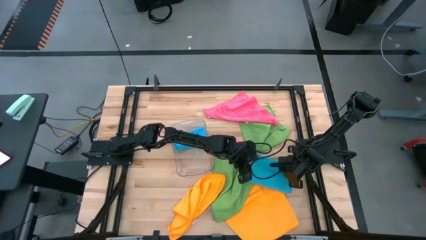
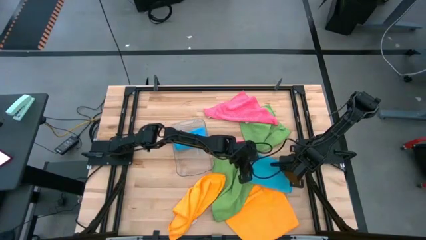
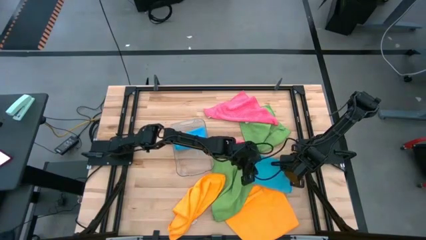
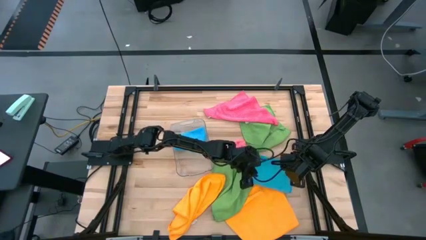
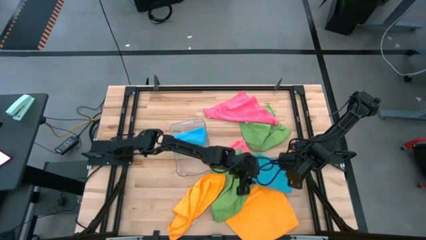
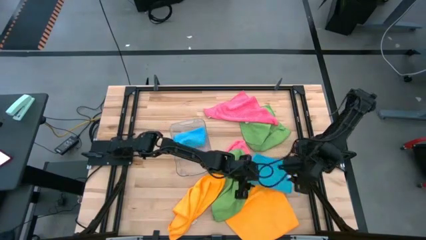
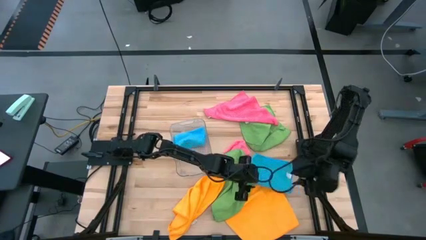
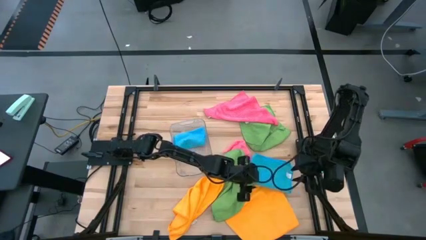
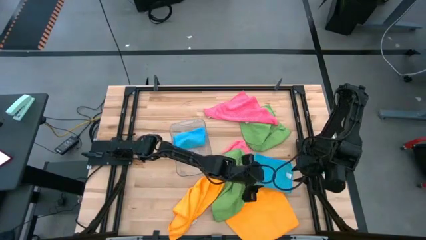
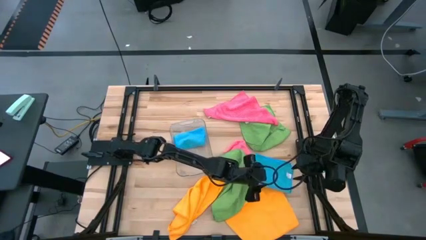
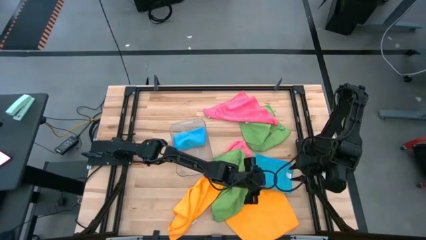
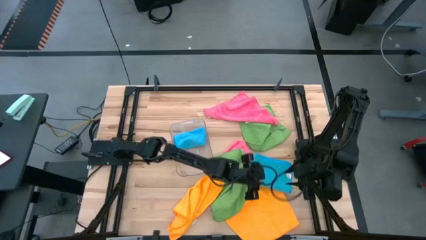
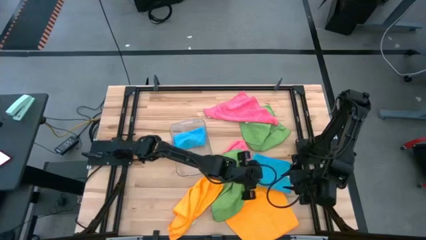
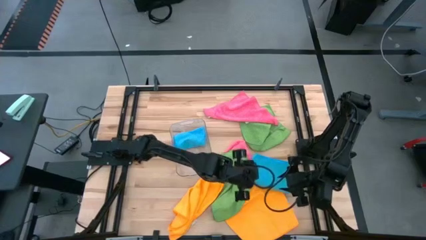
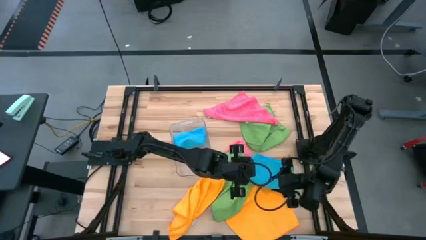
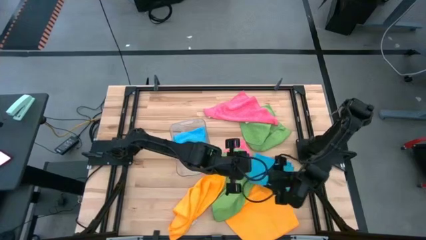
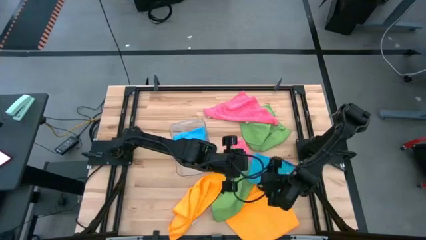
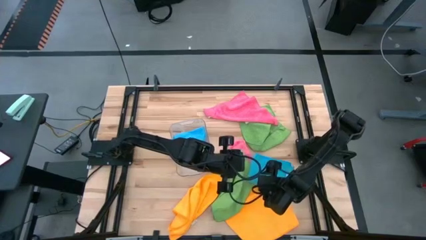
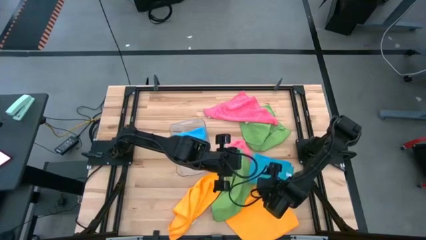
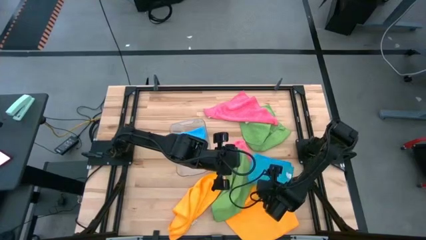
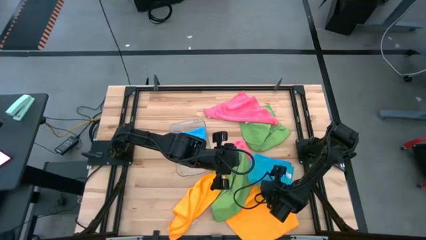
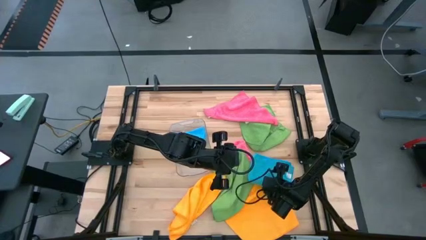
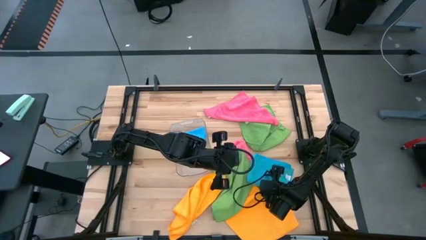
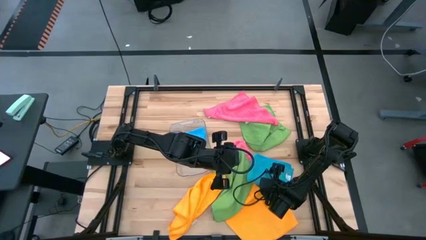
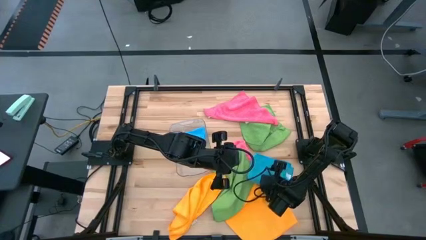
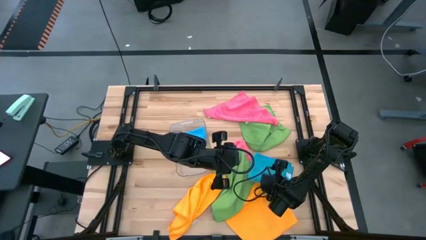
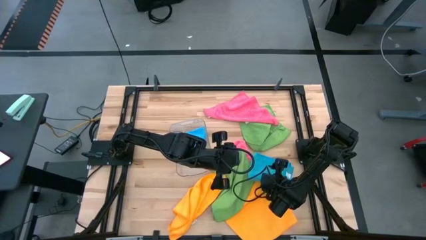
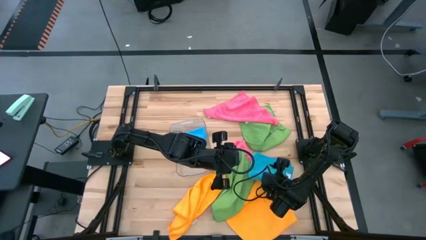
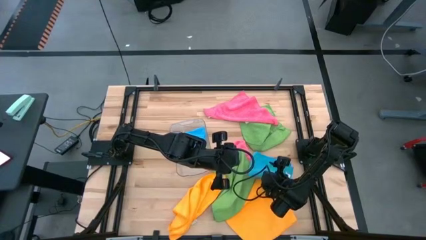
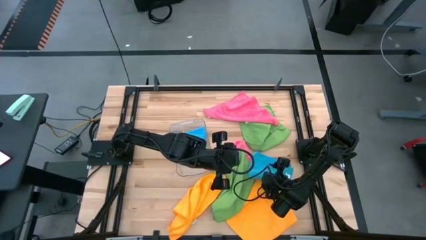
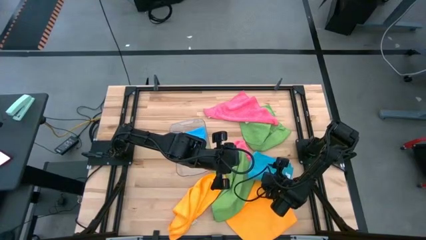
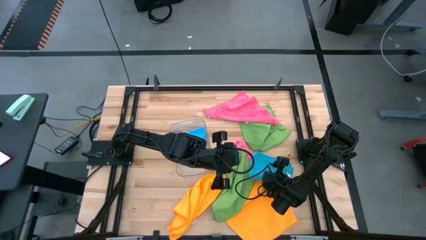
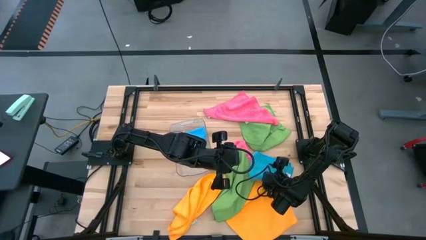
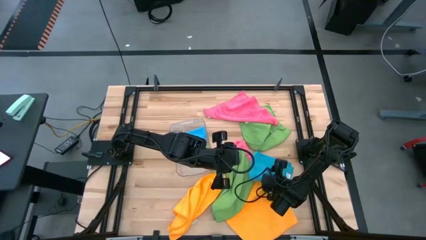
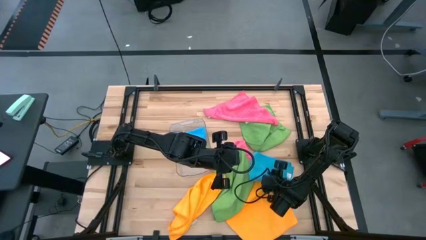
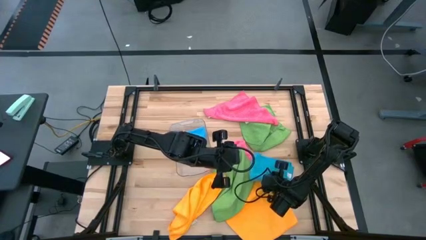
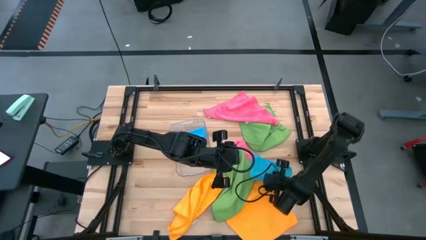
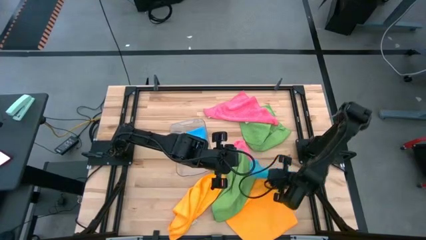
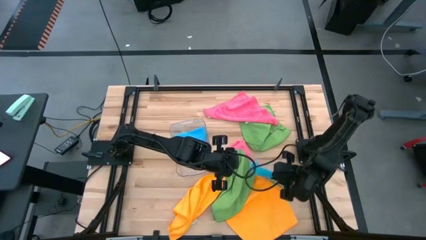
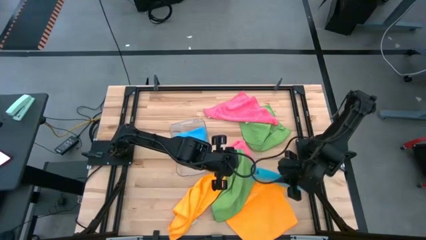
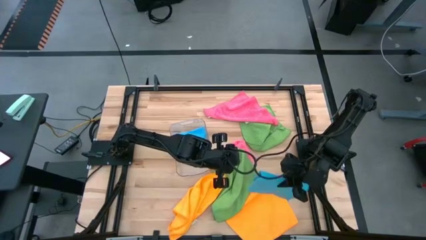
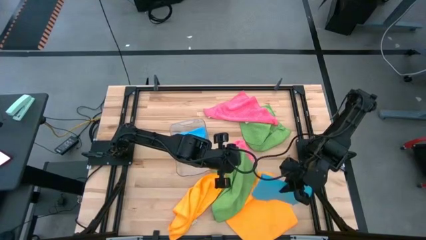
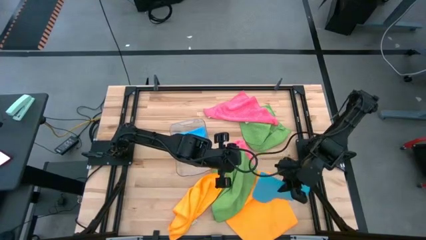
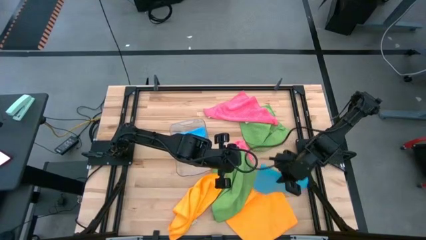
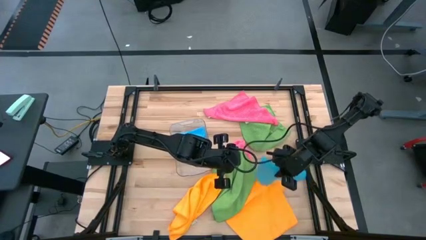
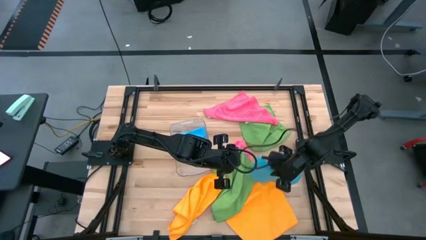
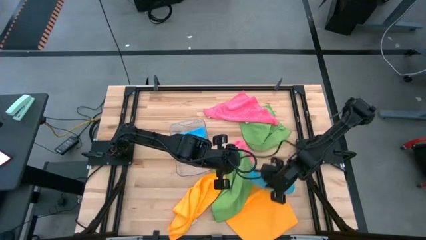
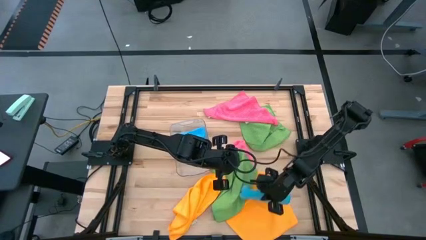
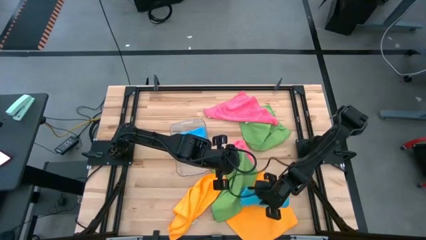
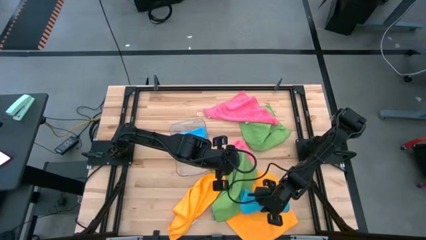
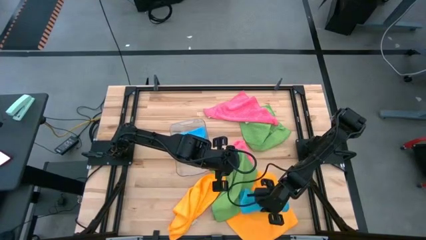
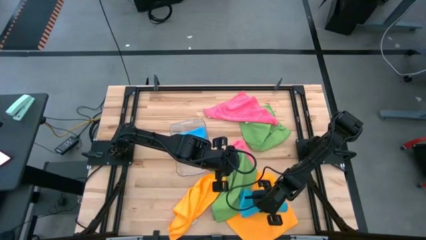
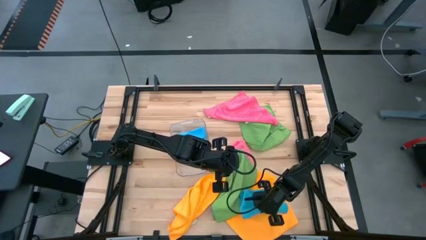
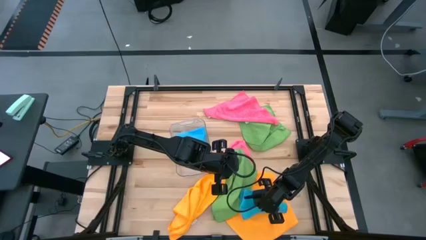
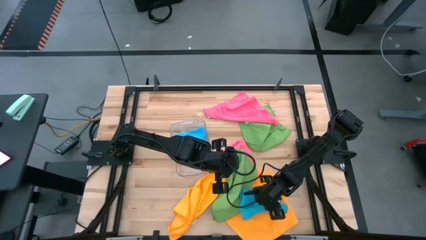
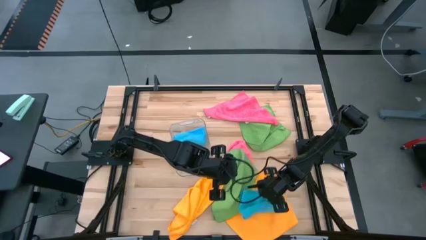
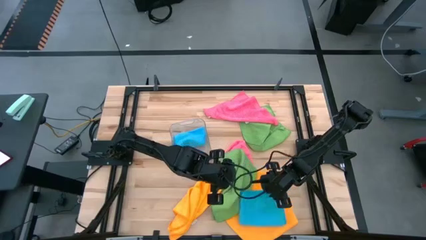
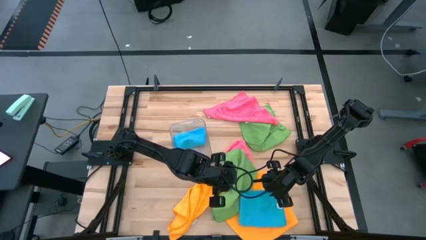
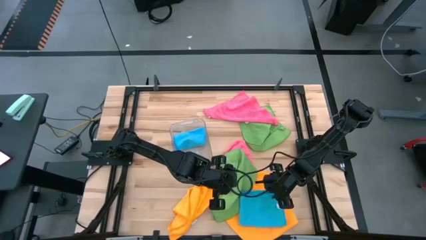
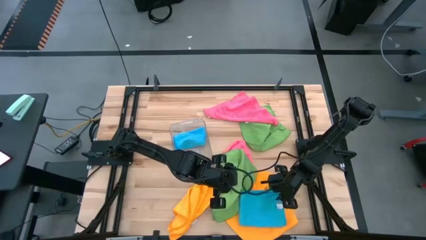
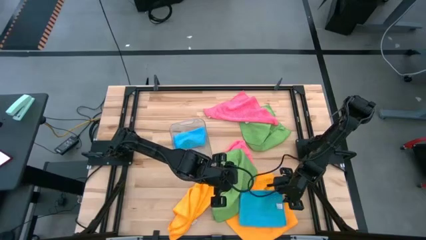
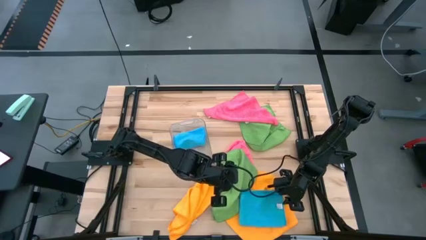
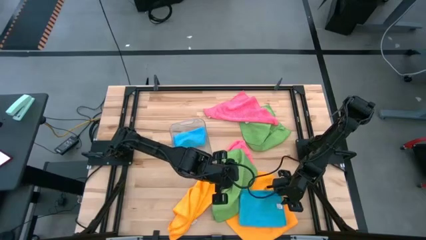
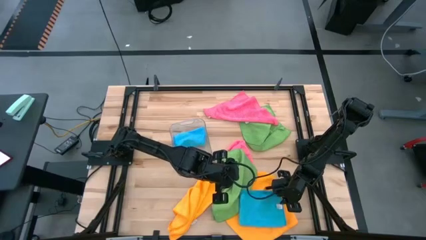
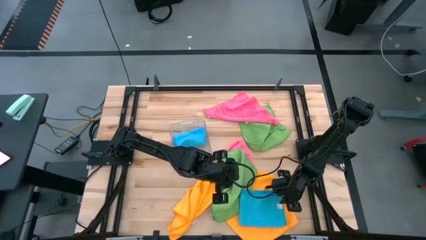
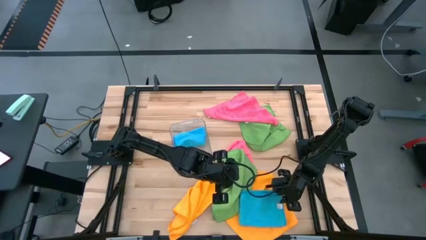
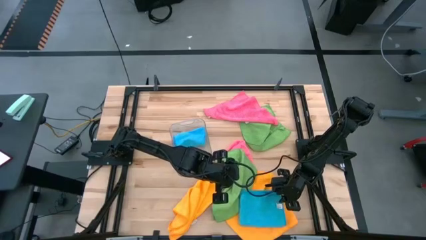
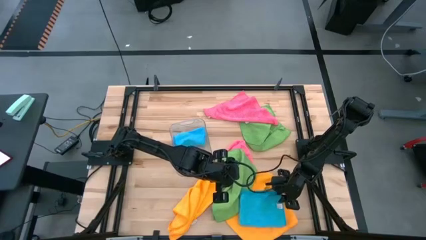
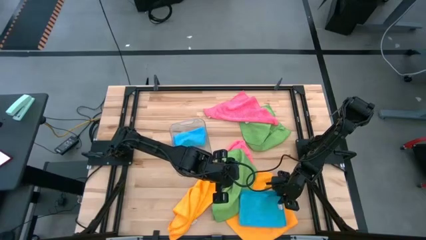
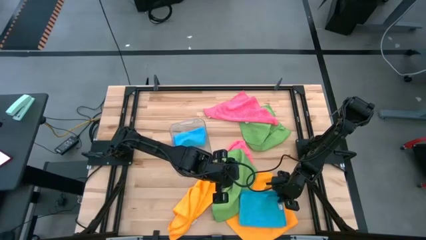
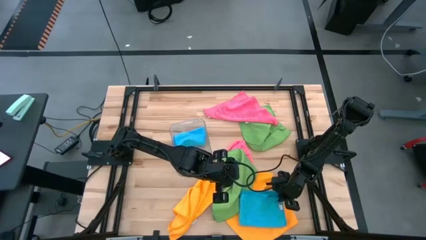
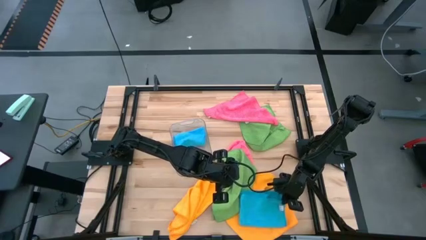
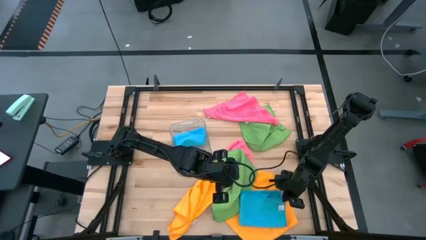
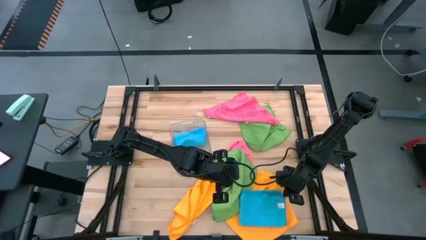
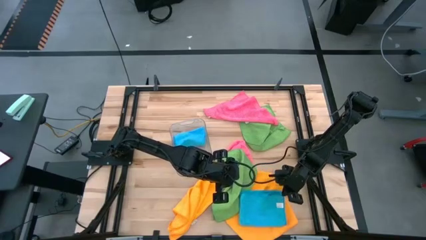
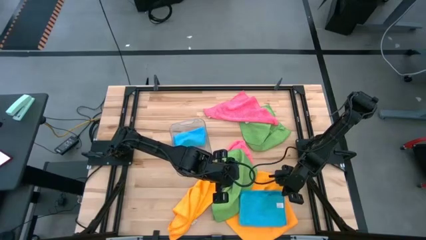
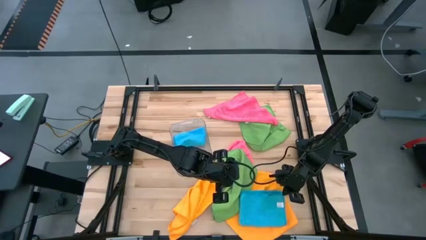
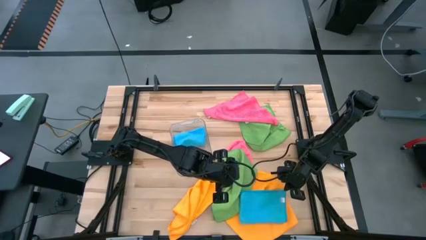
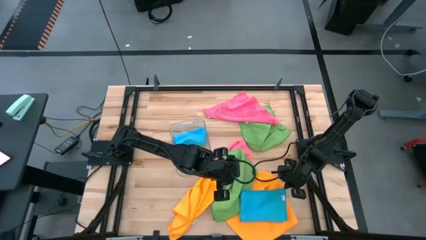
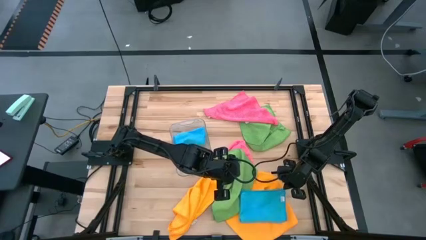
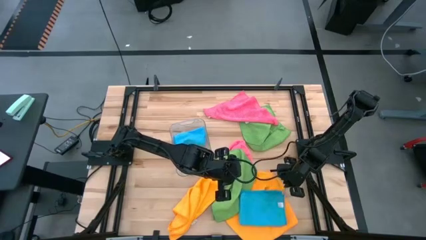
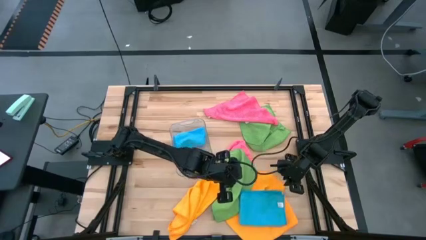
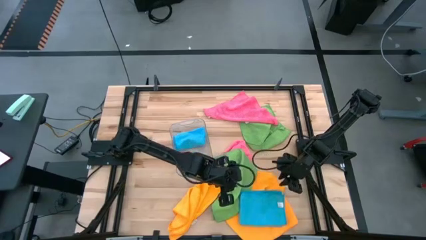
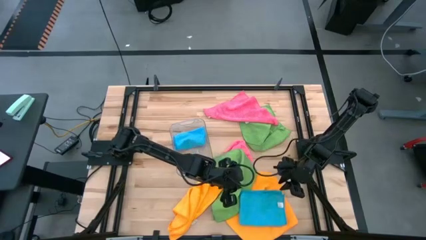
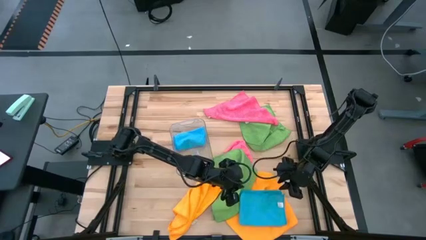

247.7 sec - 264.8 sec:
Task: Fold microfiber towels
Fold the blue towel
